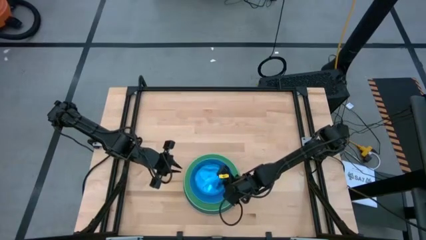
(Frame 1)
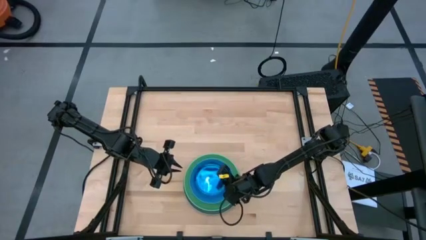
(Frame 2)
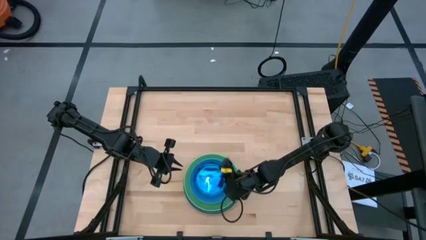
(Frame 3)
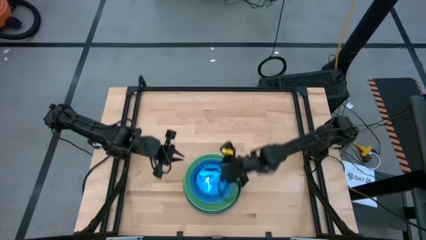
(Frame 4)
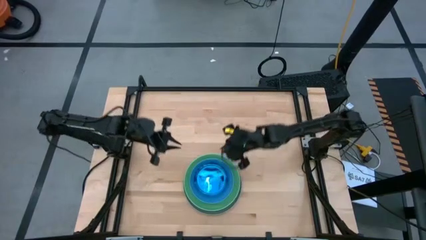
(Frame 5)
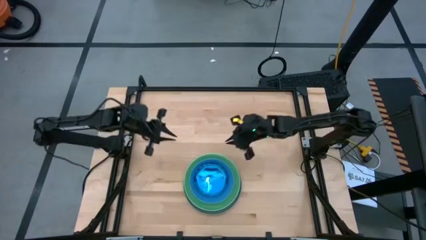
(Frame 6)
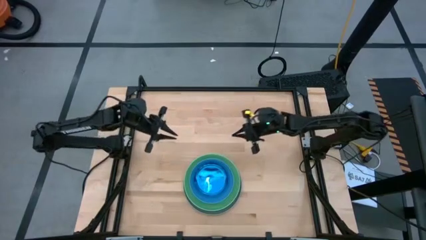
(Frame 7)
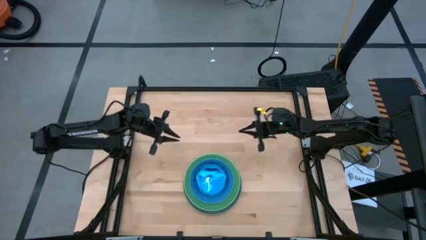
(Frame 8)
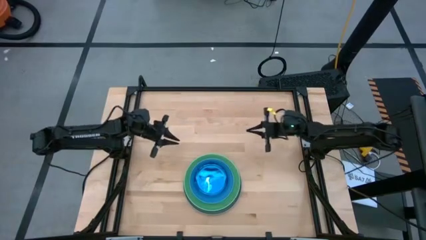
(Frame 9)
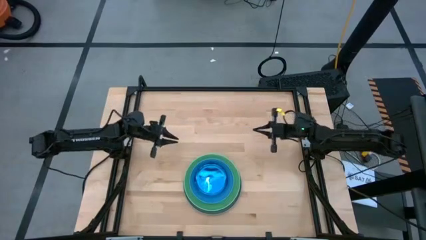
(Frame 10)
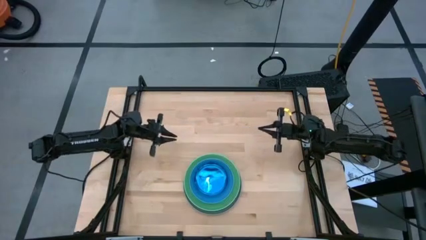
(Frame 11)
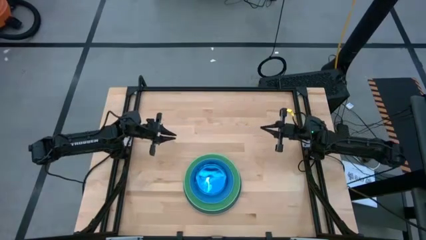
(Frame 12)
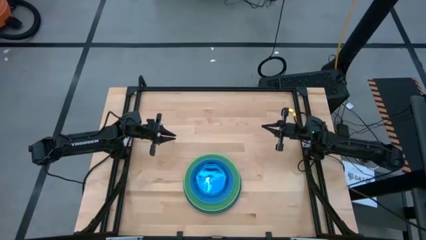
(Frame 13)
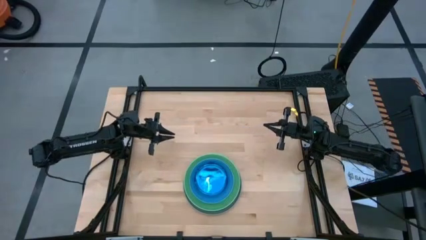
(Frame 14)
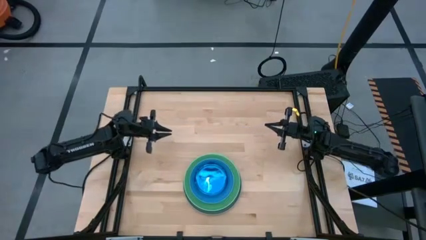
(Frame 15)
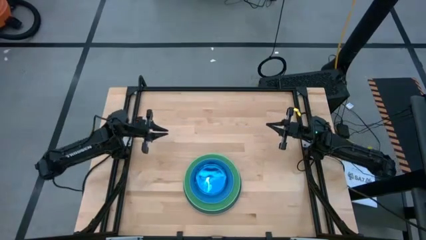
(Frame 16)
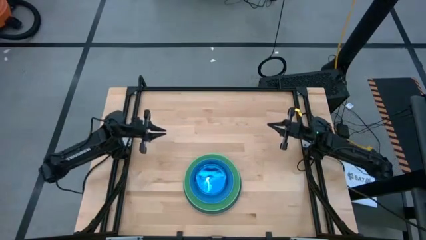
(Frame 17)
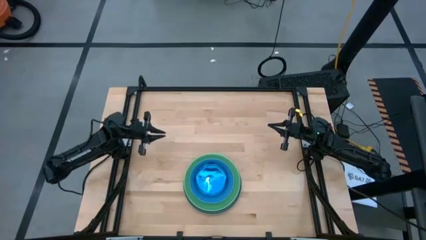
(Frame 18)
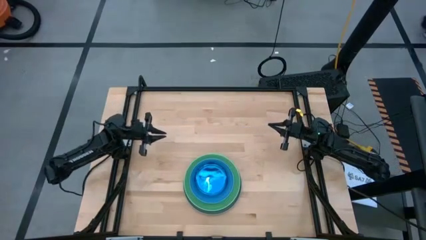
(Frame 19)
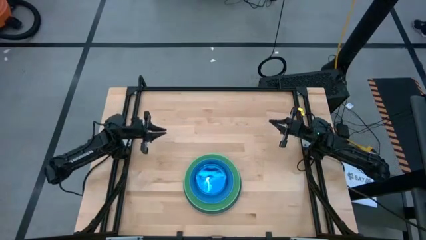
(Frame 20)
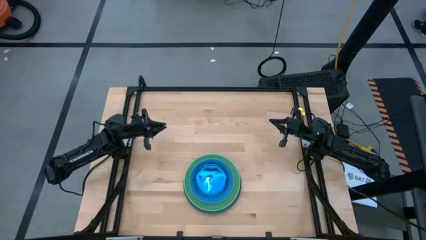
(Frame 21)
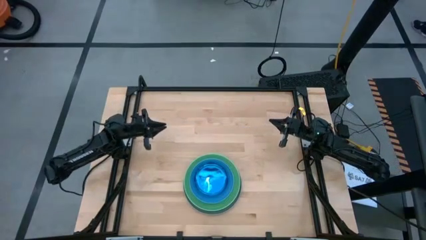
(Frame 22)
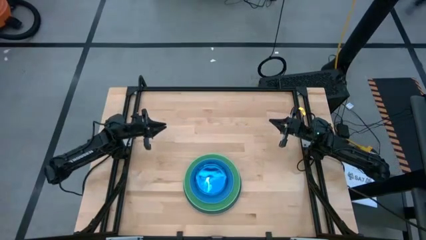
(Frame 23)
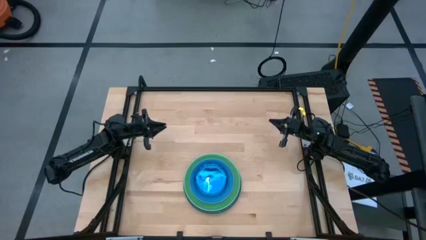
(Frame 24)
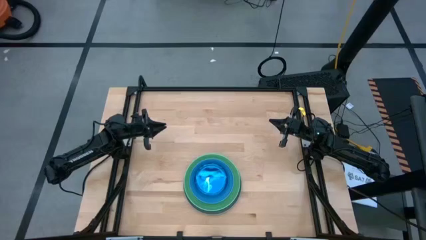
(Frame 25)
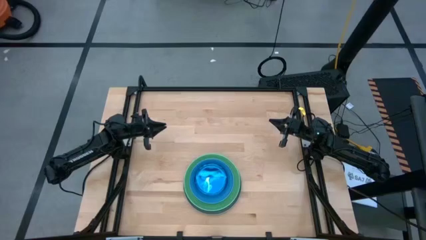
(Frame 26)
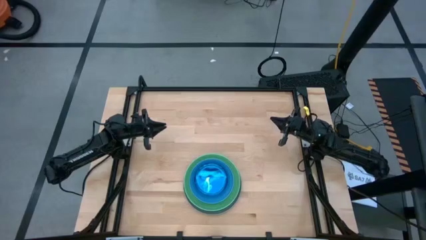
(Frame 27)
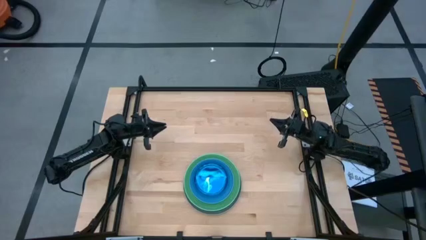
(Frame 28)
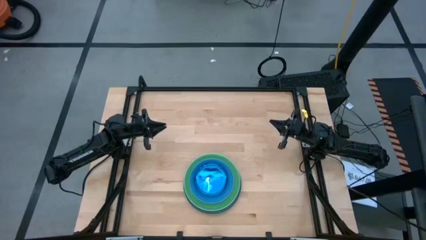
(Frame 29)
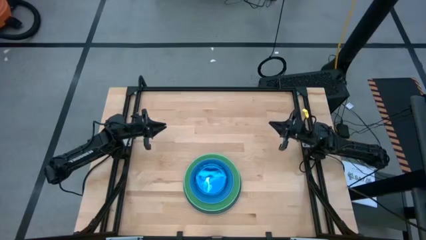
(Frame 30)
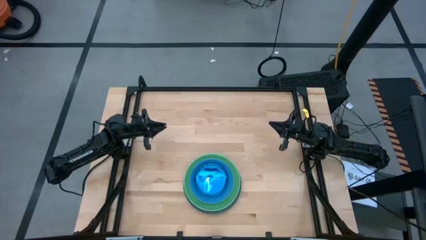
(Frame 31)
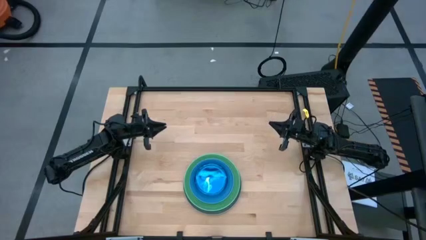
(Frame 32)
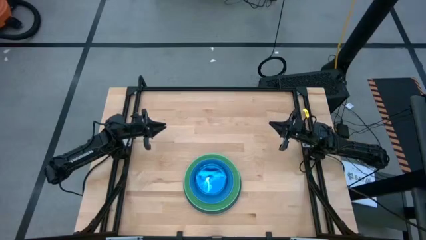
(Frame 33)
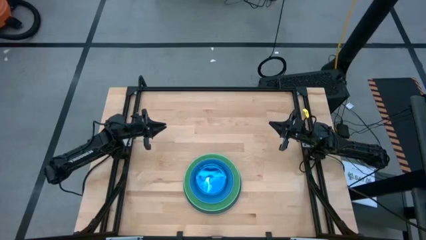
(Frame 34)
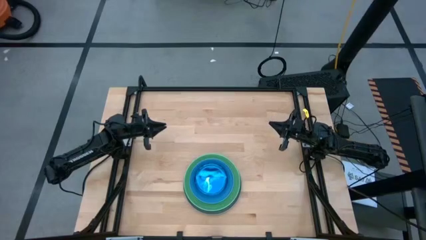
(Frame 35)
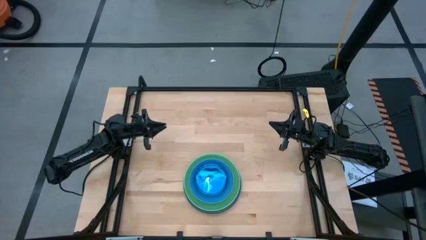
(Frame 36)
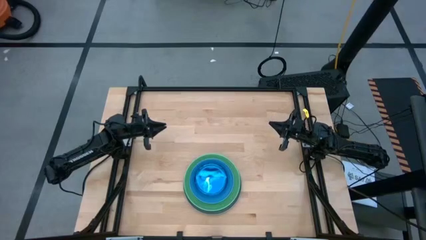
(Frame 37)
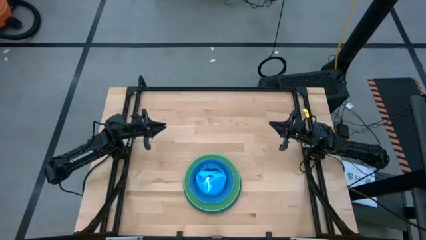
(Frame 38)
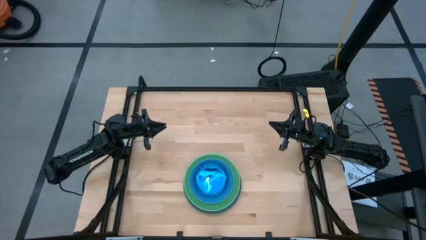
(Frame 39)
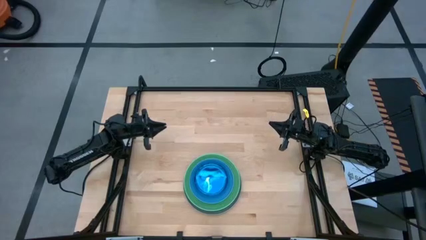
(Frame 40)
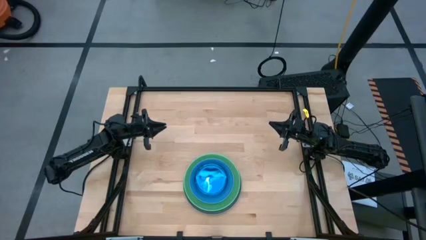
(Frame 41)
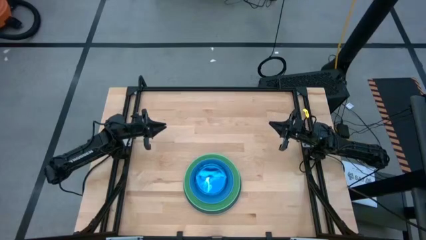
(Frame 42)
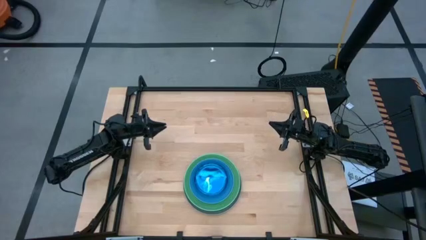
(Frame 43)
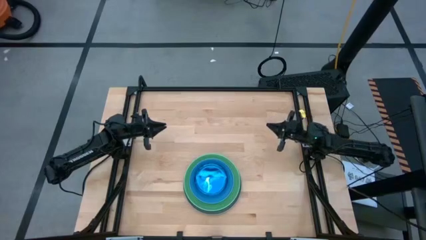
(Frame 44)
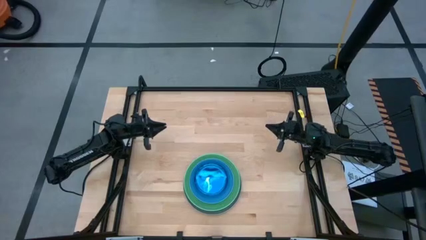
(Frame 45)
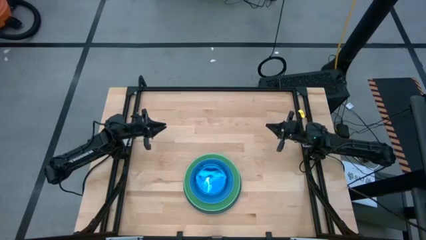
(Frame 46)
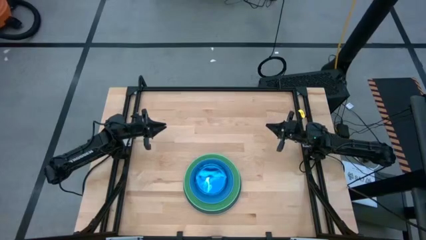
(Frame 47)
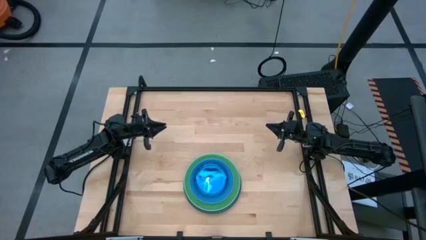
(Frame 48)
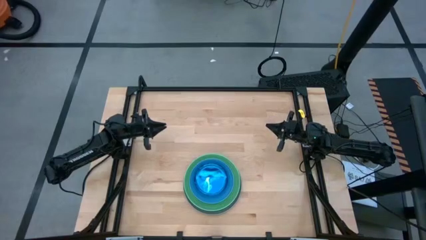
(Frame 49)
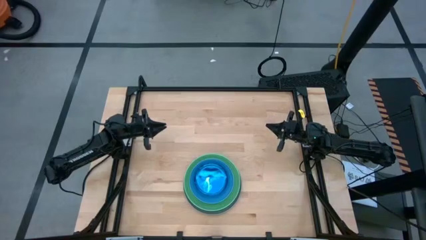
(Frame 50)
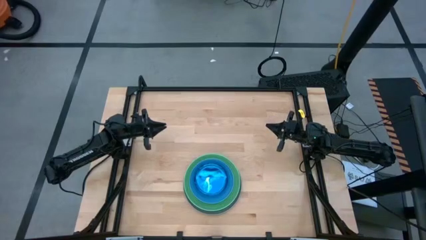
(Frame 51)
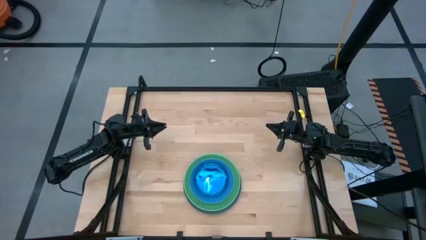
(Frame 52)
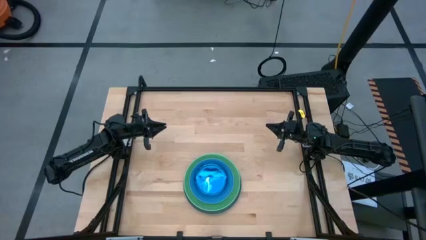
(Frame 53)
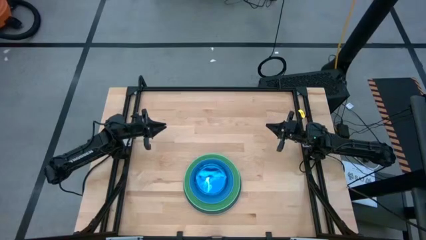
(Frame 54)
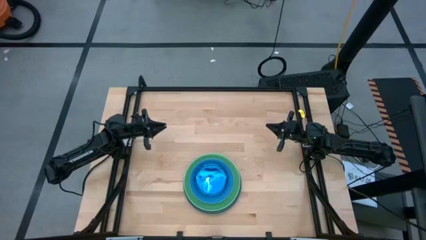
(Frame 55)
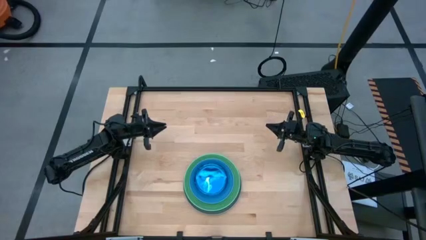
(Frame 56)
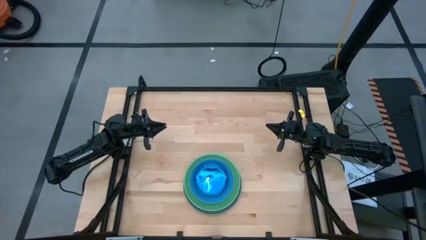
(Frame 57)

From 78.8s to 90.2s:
Task: Stack plastic plates
Return to Home Position

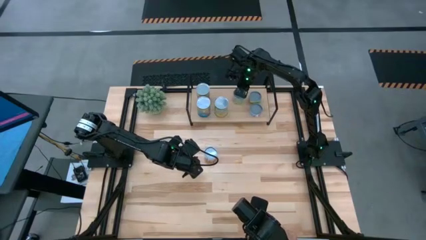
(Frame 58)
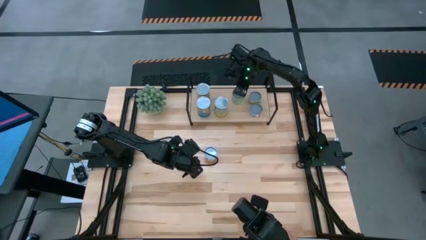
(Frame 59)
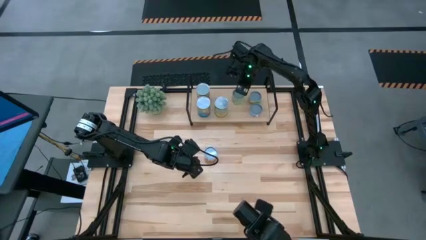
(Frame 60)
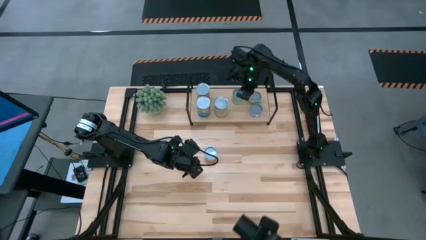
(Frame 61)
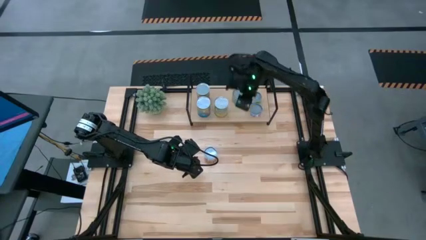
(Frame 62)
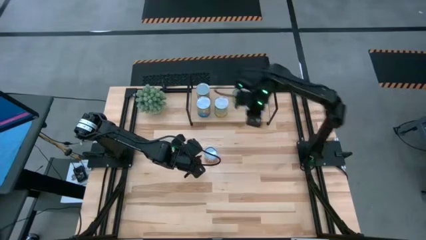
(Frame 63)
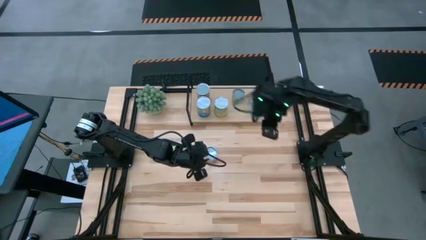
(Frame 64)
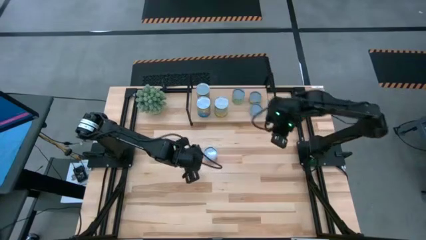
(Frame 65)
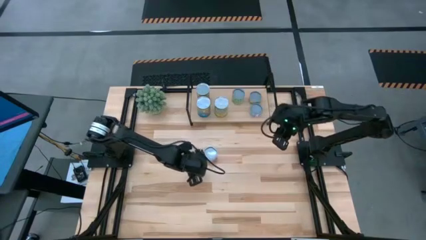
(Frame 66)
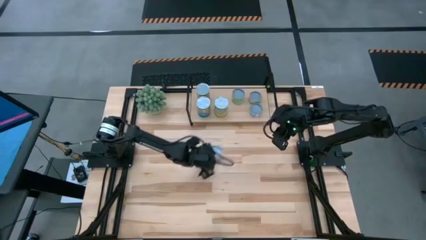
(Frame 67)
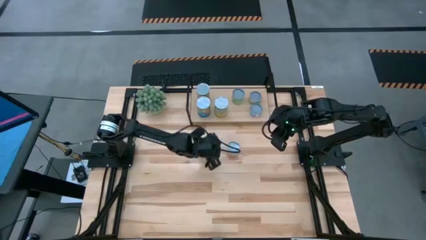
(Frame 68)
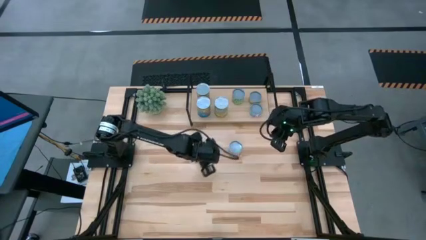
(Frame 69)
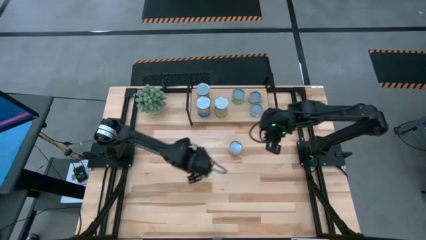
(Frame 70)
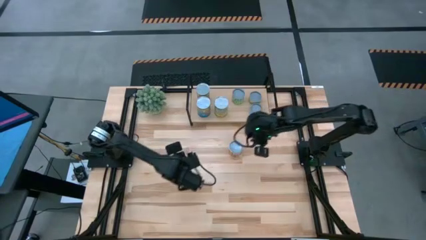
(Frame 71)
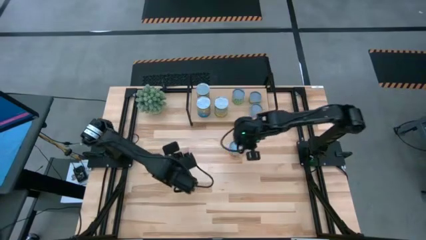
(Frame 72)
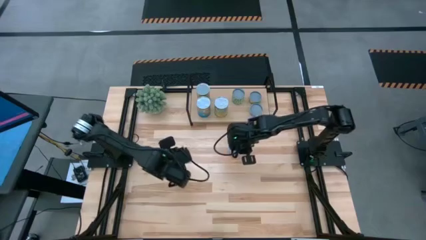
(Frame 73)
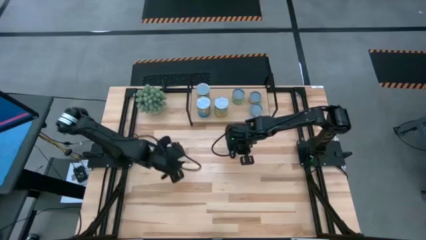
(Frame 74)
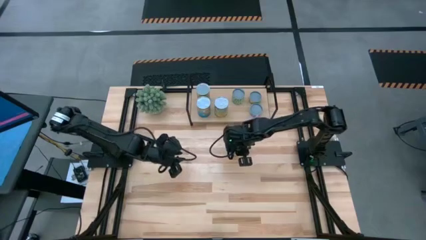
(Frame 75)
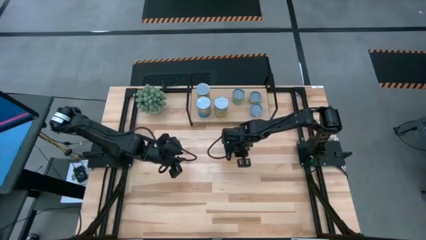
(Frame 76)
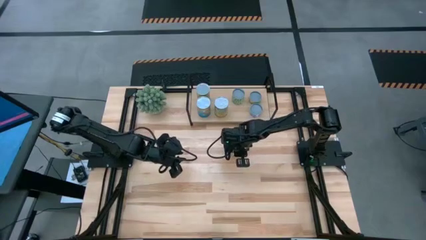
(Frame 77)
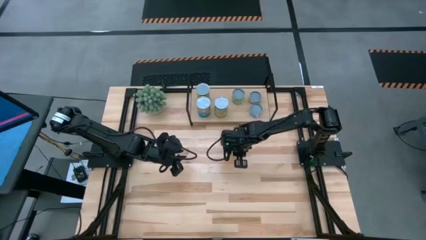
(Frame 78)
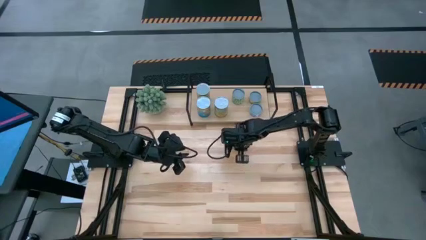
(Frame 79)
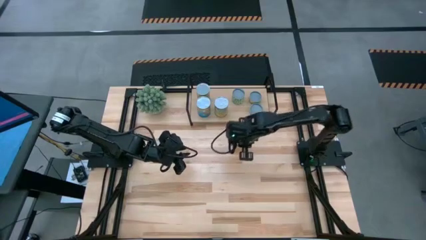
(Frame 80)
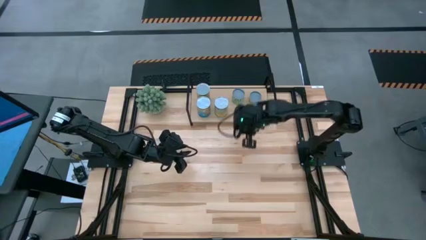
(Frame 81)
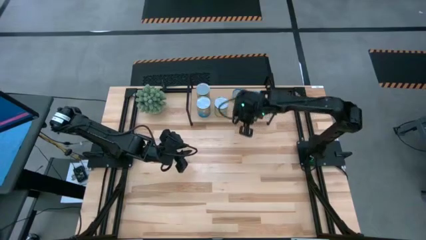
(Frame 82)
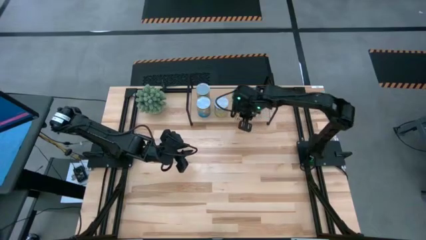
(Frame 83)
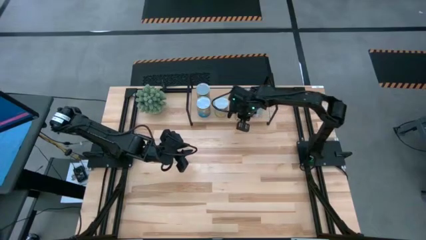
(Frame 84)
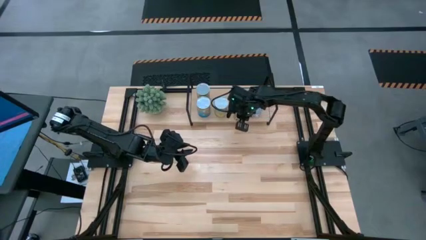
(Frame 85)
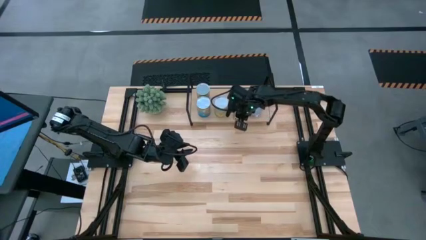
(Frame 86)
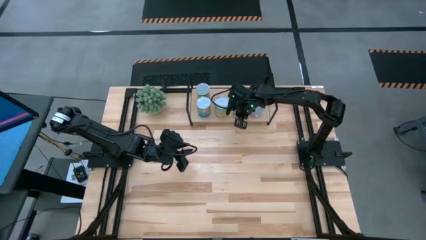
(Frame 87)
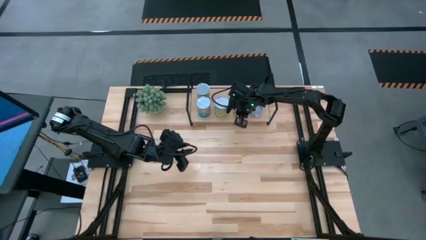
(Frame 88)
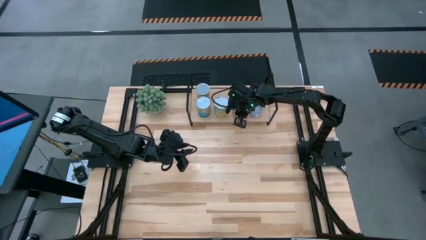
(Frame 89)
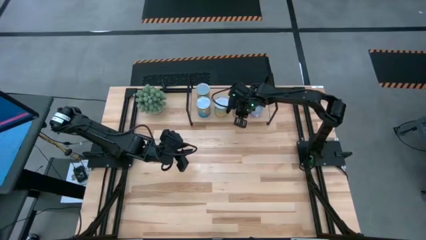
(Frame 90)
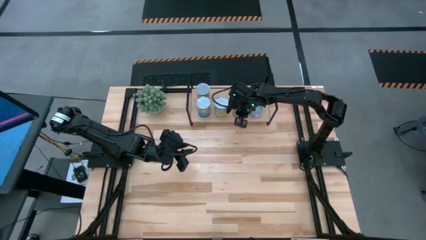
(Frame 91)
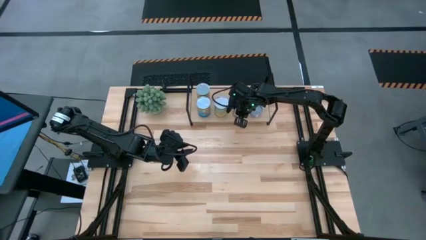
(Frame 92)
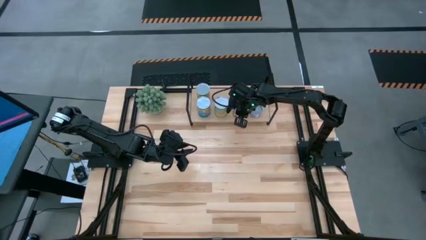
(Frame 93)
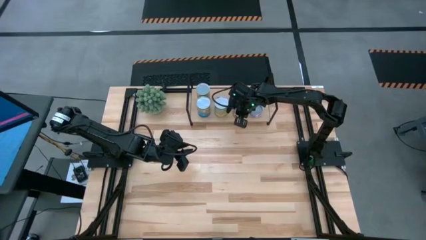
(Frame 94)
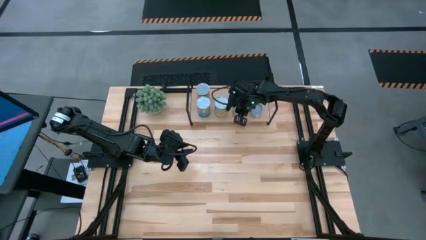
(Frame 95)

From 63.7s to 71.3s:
Task: Pick and place cans onto a shelf
Put the canned black beans on the shelf
